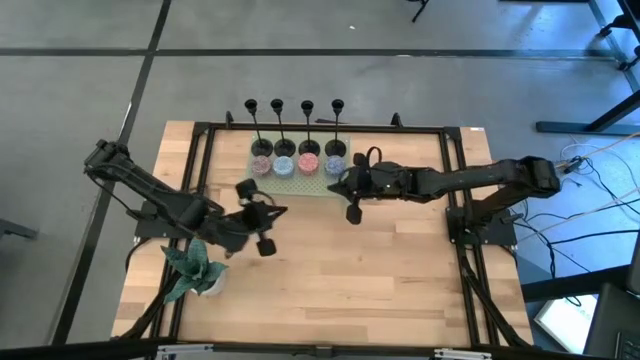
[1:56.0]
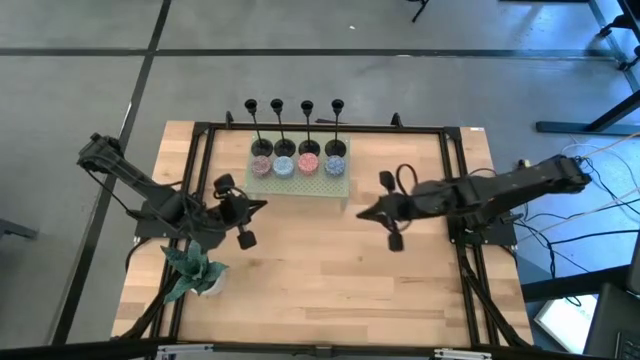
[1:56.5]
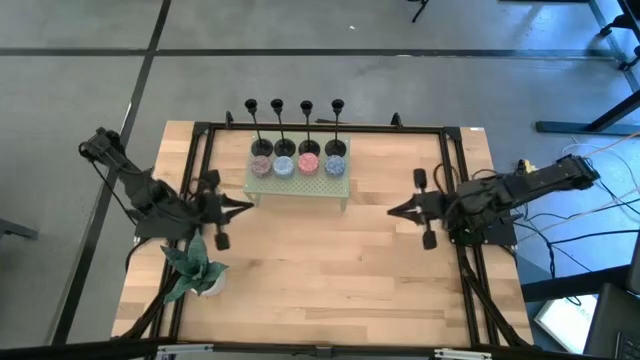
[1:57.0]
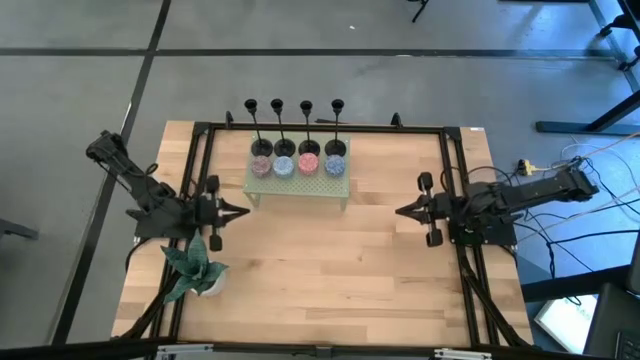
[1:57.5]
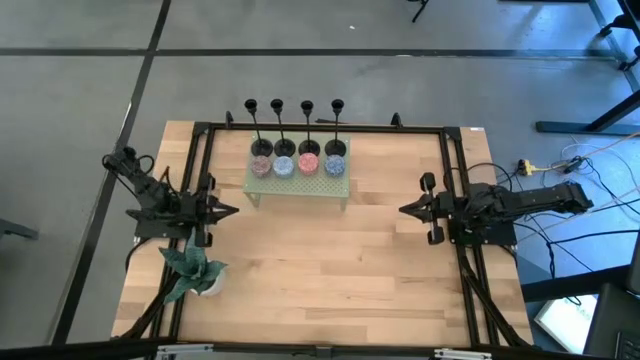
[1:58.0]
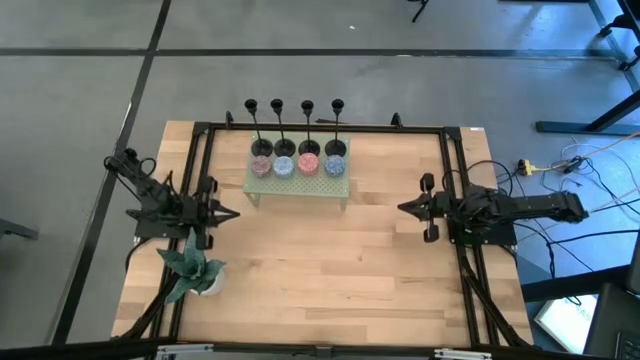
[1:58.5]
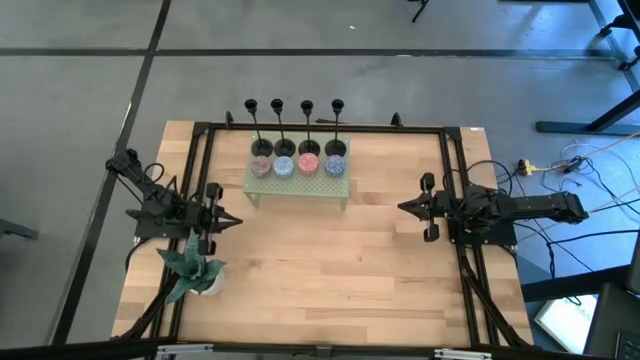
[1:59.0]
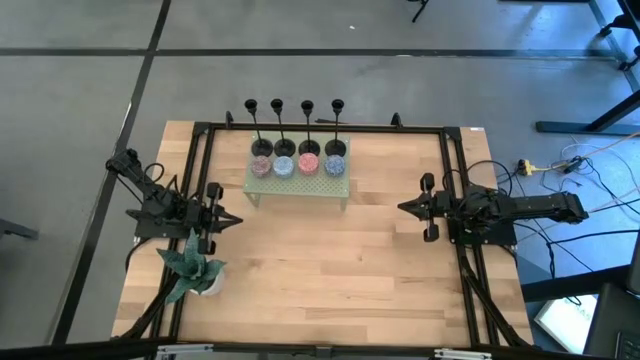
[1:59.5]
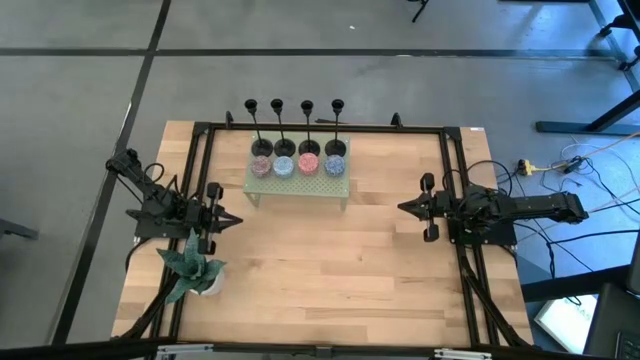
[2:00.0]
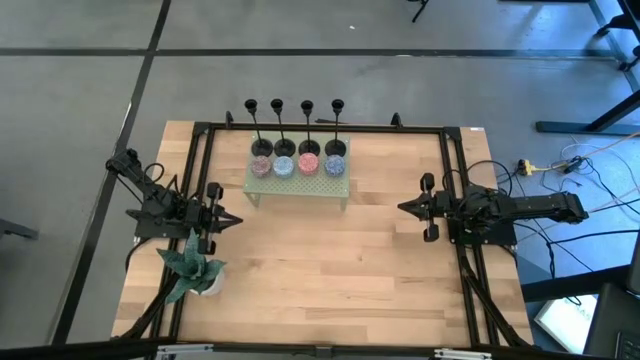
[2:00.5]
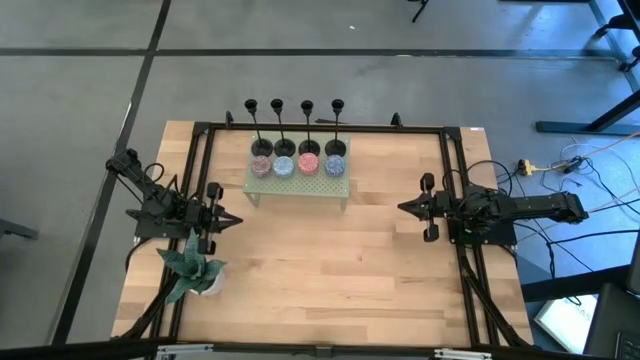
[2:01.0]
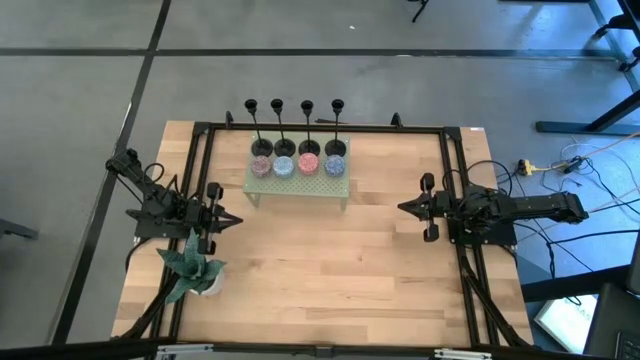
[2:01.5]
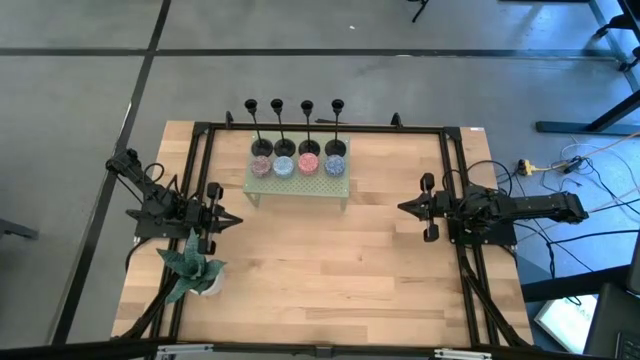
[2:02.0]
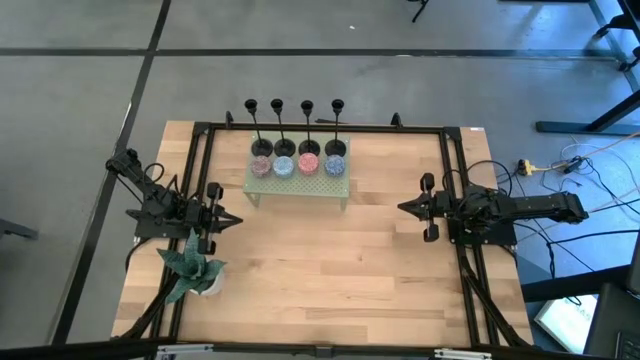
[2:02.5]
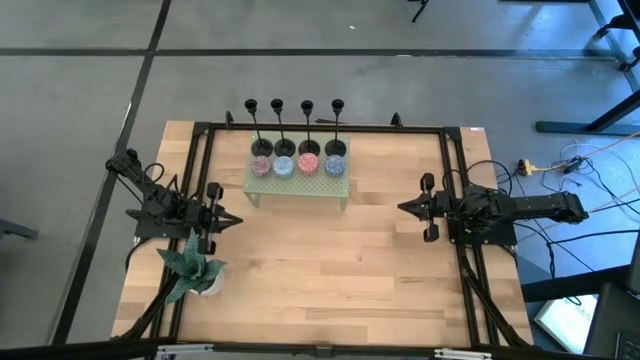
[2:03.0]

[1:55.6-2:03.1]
Task: Pick & Place candle stick holders
Return to Home Position

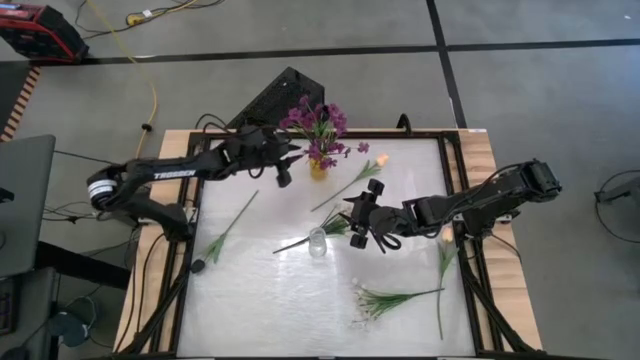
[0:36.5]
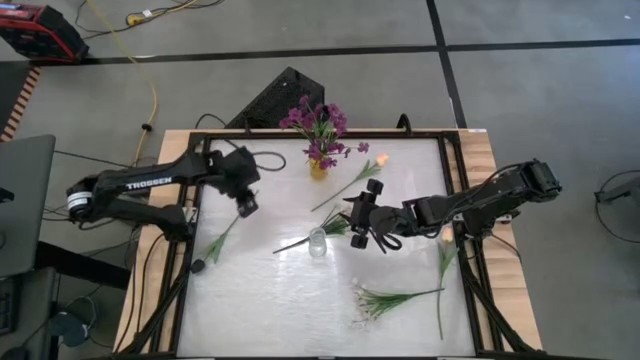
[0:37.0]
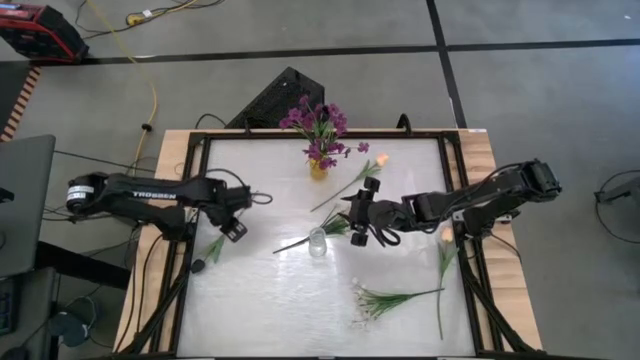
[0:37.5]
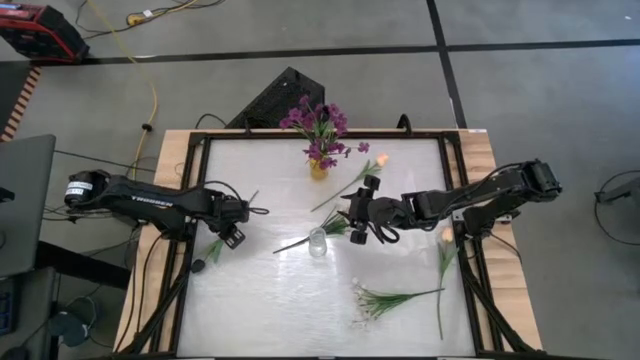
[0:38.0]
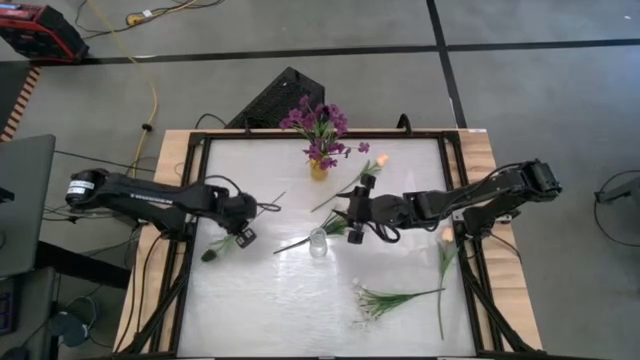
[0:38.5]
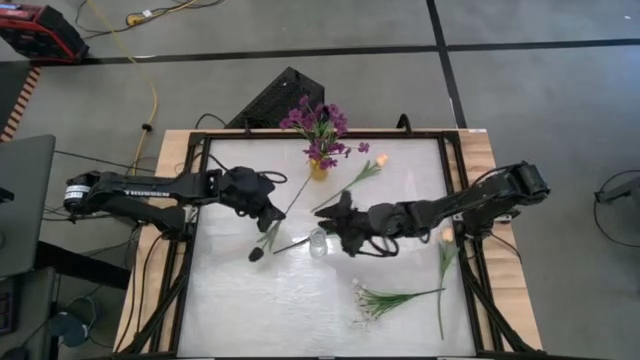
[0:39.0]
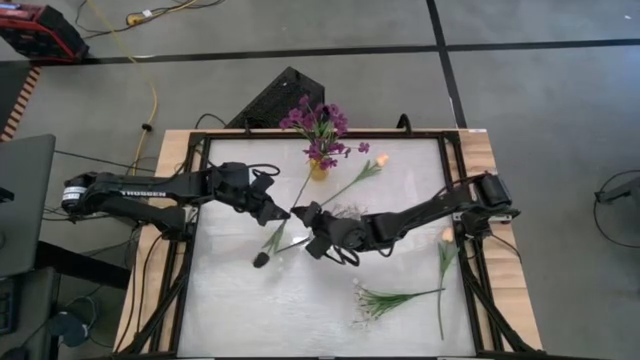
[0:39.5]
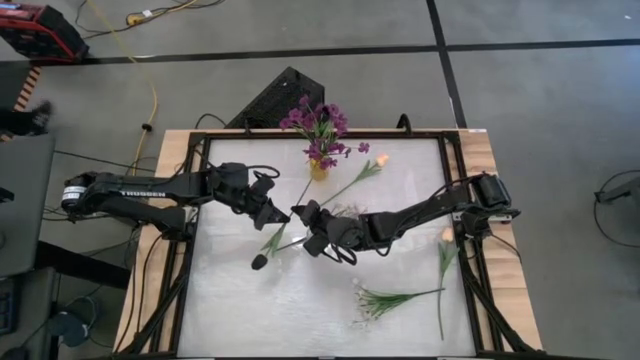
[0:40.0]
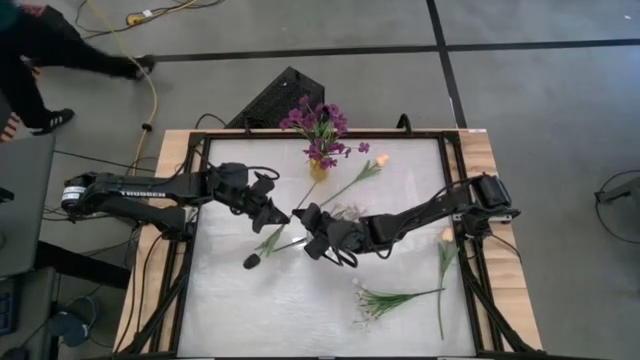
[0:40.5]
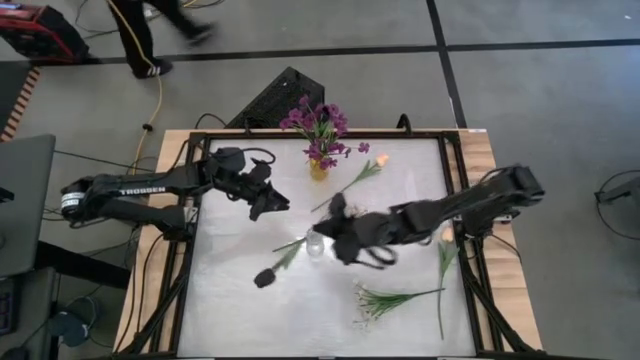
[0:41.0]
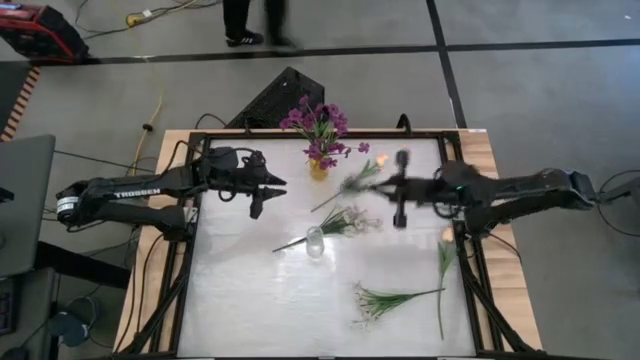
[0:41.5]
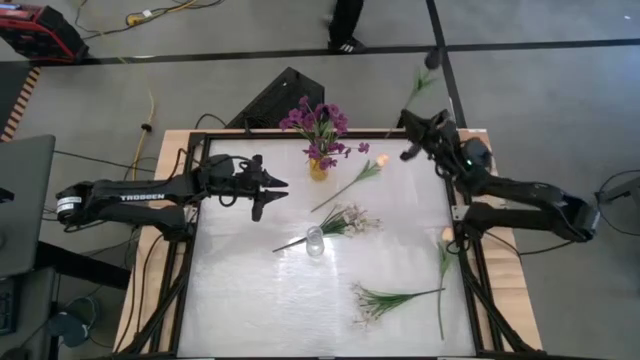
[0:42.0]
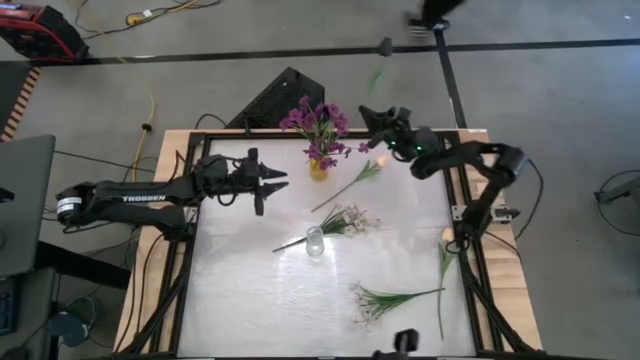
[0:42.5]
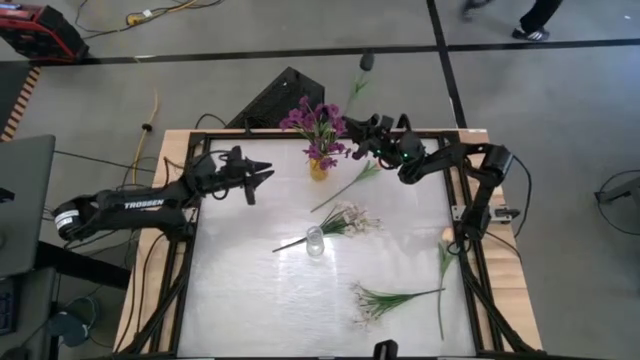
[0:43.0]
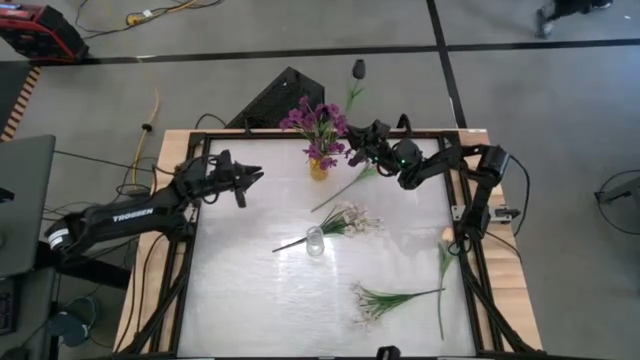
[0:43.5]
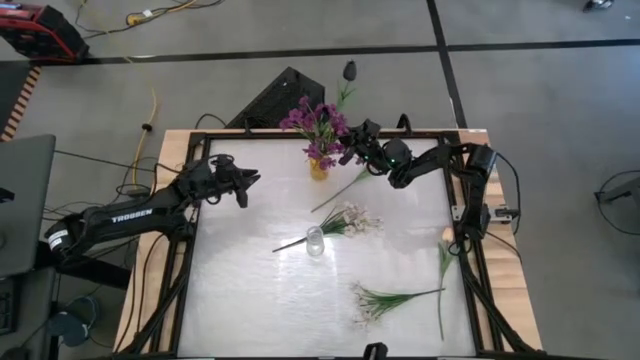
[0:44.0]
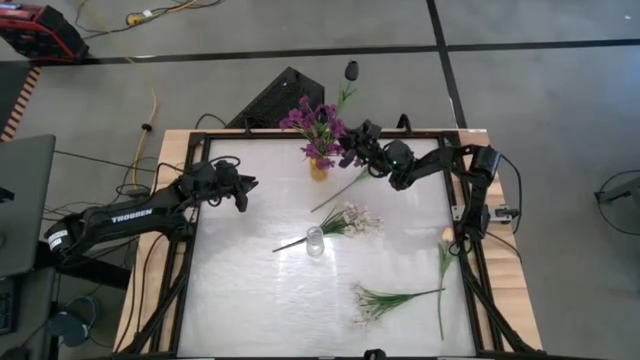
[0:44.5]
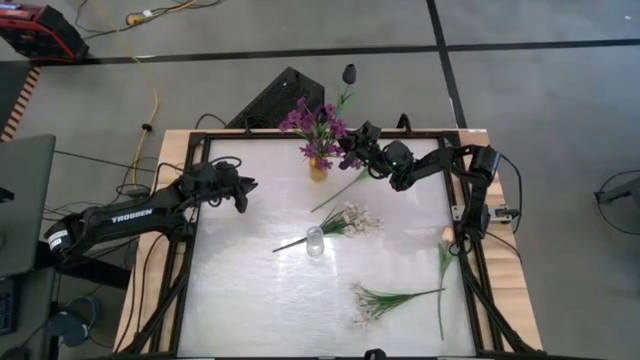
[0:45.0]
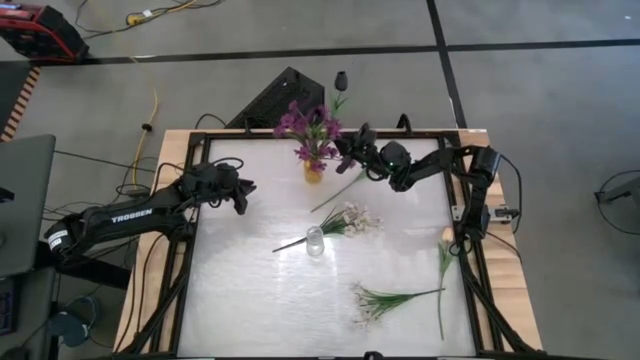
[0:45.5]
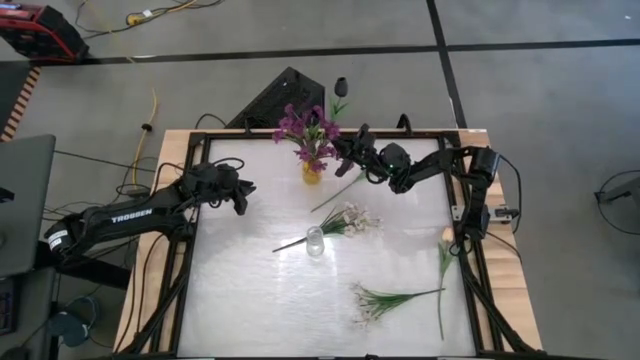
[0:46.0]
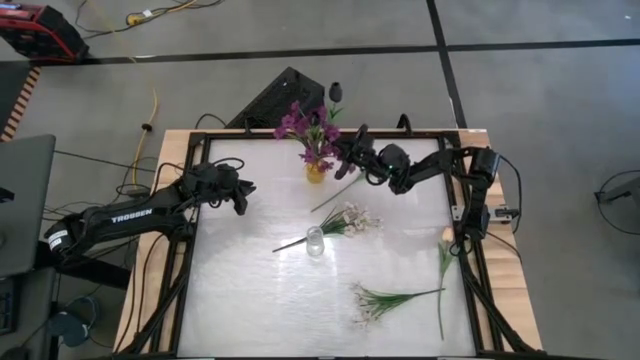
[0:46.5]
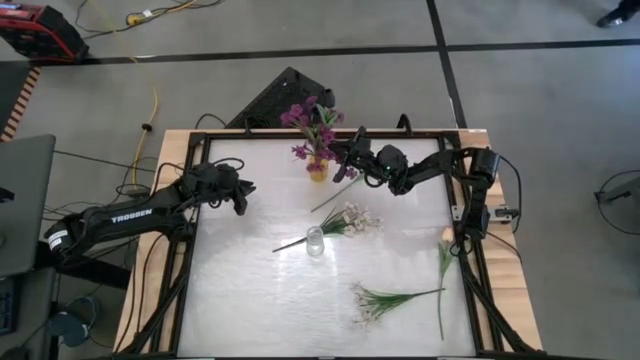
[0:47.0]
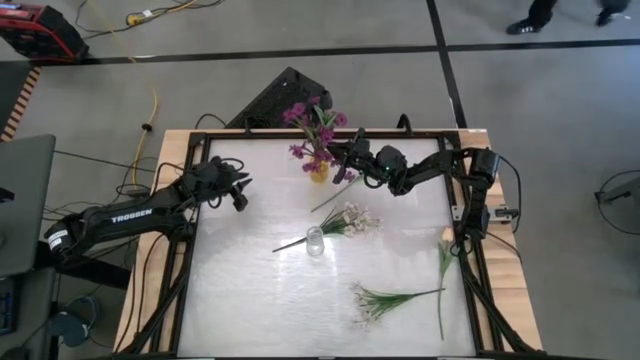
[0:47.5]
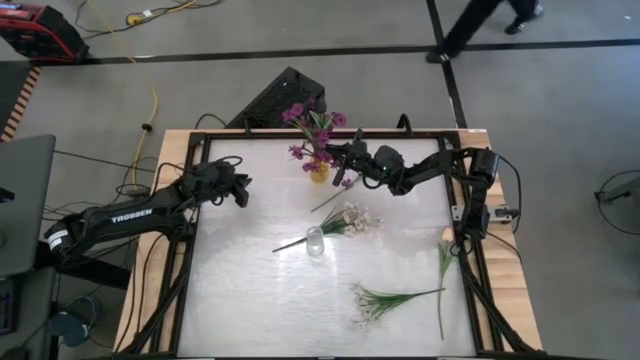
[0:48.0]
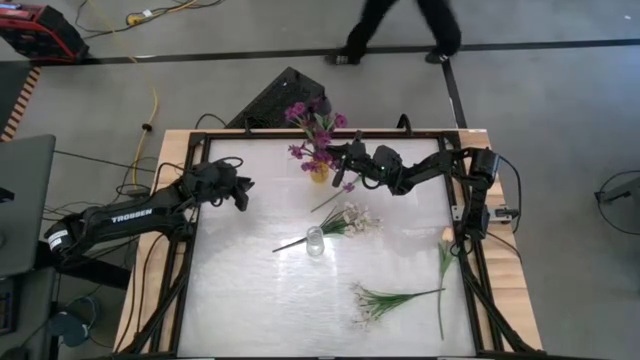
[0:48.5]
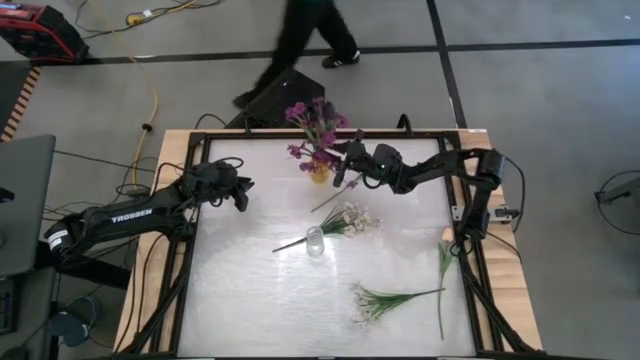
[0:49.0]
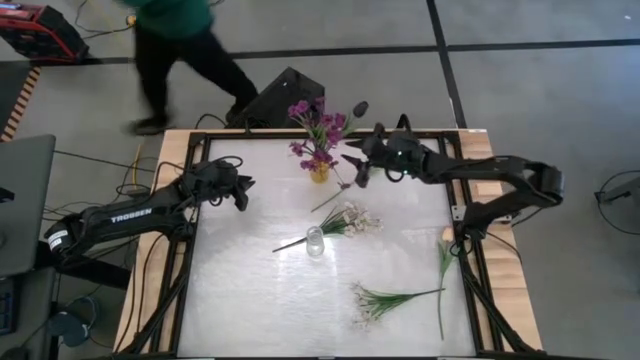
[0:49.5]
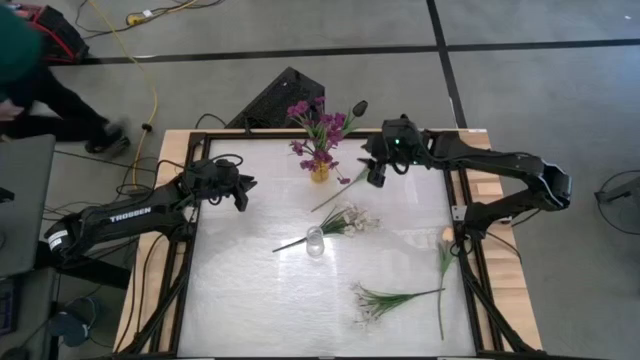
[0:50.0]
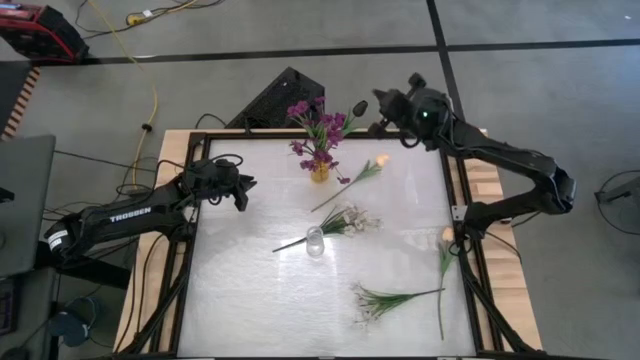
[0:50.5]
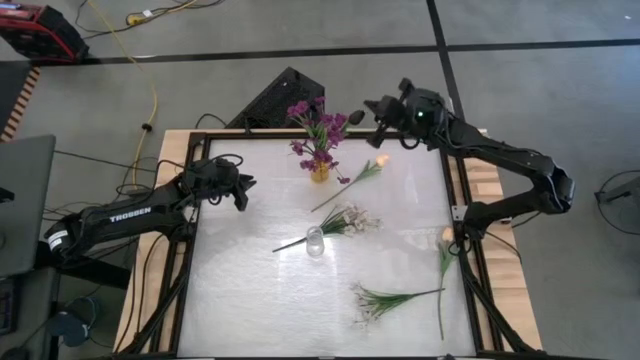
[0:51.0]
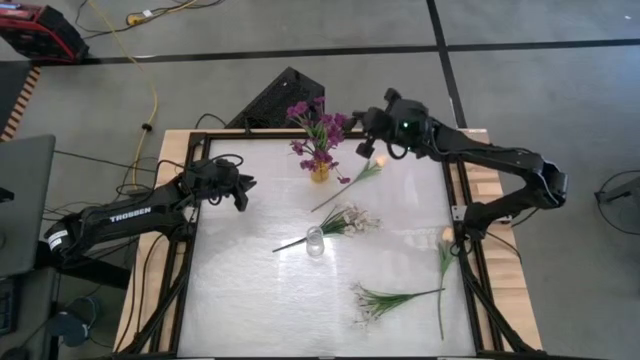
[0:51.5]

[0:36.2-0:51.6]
Task: Sort flowers into vase by color
Put the black flower into the yellow vase
